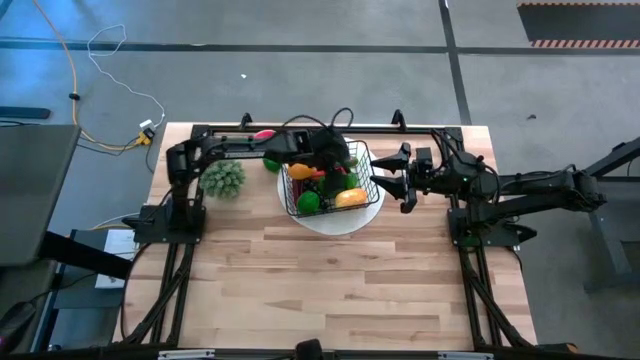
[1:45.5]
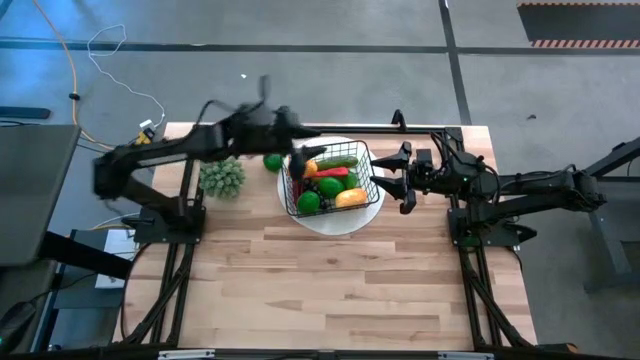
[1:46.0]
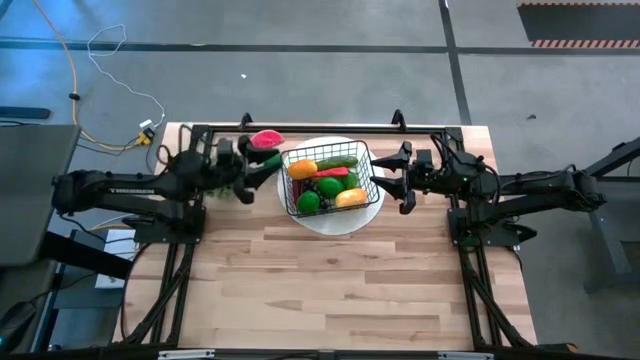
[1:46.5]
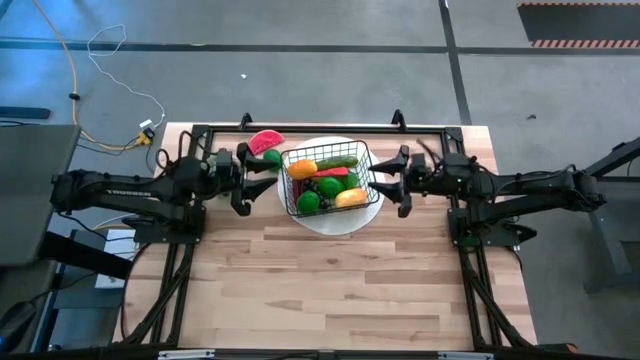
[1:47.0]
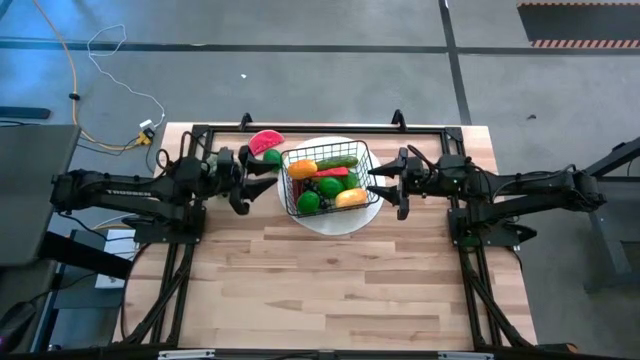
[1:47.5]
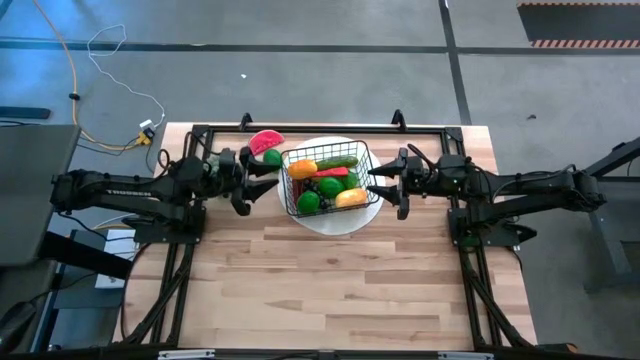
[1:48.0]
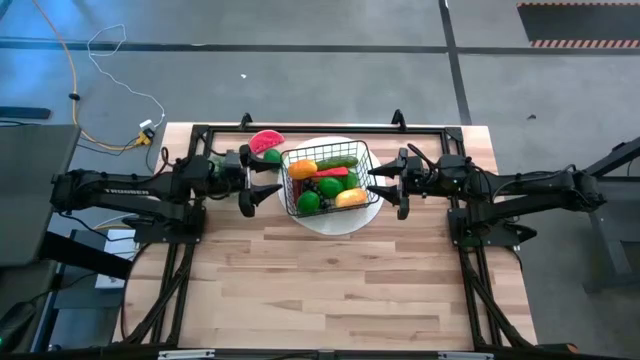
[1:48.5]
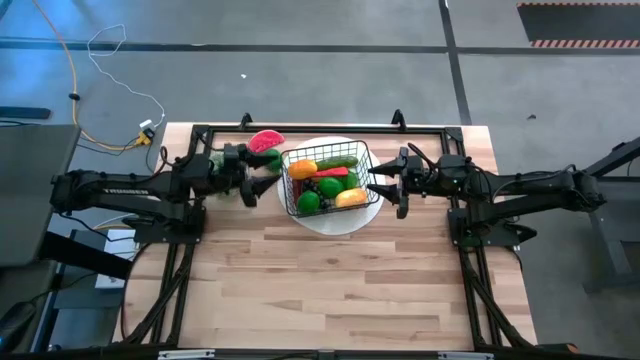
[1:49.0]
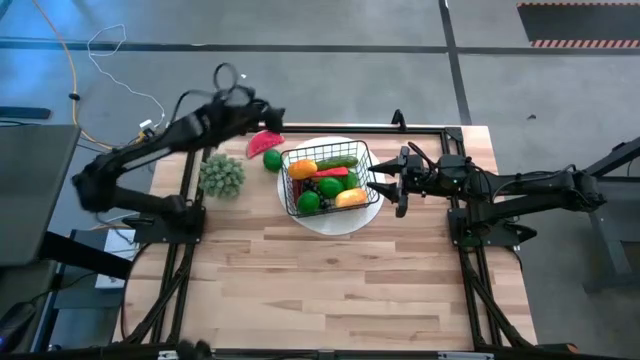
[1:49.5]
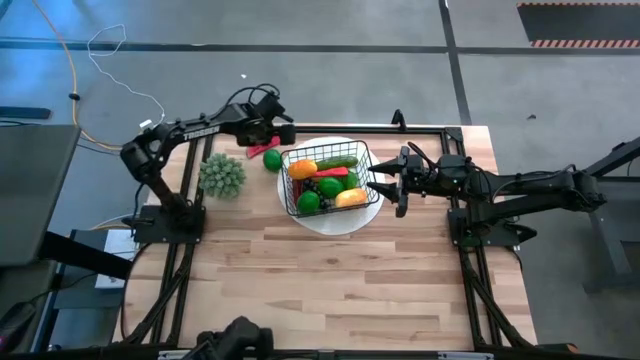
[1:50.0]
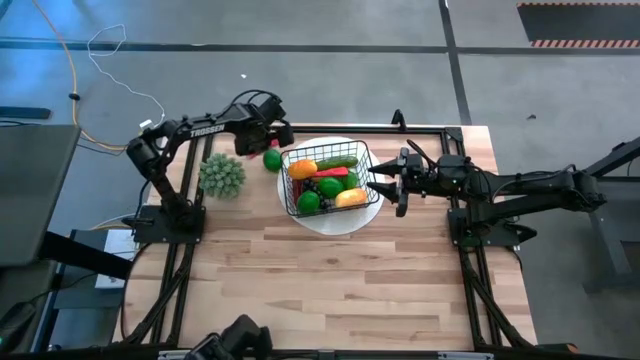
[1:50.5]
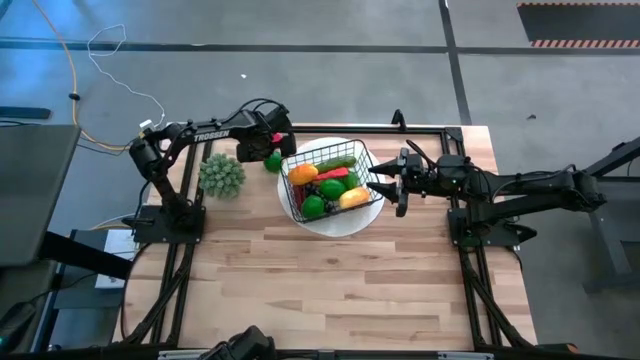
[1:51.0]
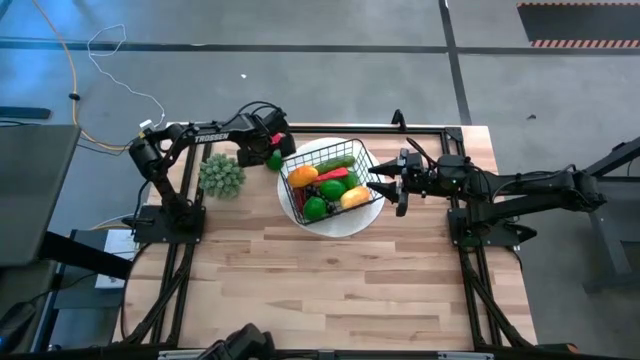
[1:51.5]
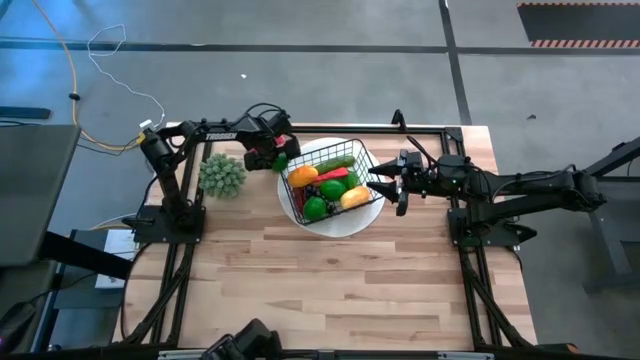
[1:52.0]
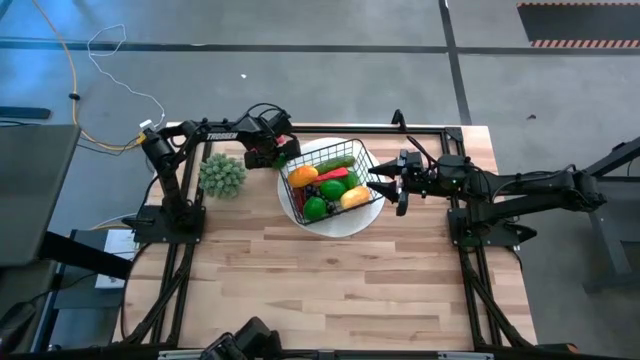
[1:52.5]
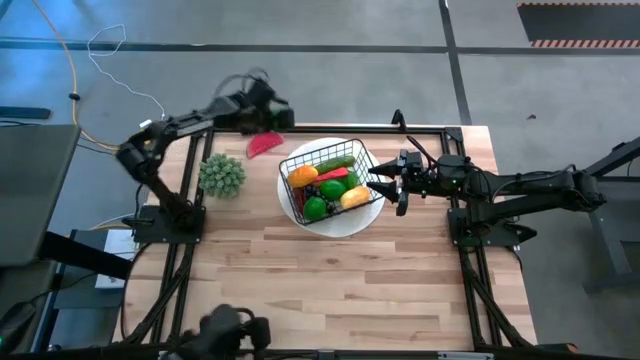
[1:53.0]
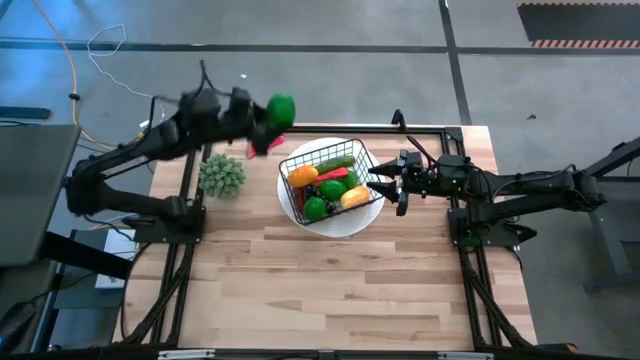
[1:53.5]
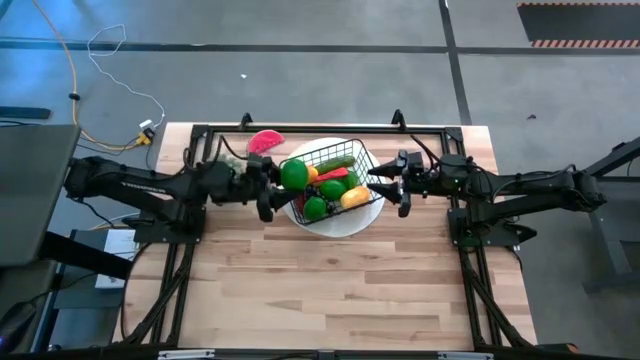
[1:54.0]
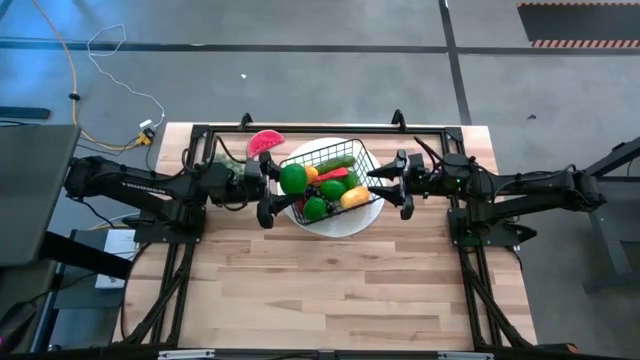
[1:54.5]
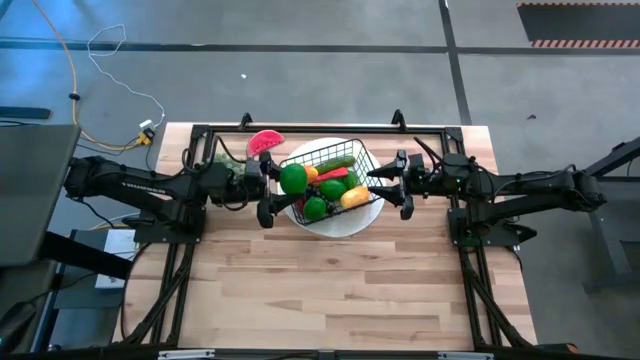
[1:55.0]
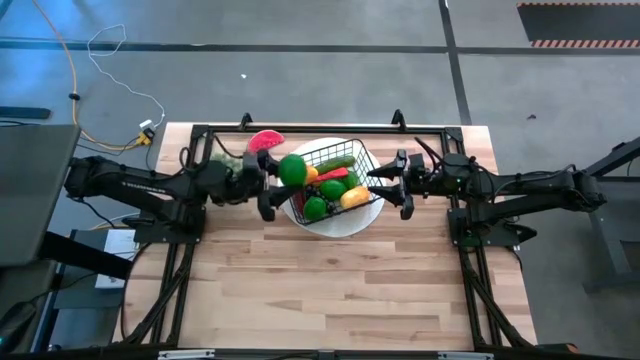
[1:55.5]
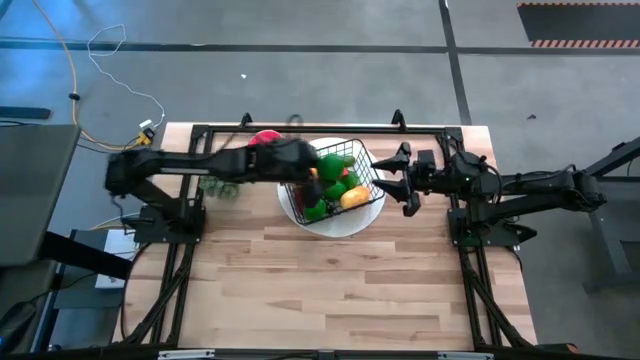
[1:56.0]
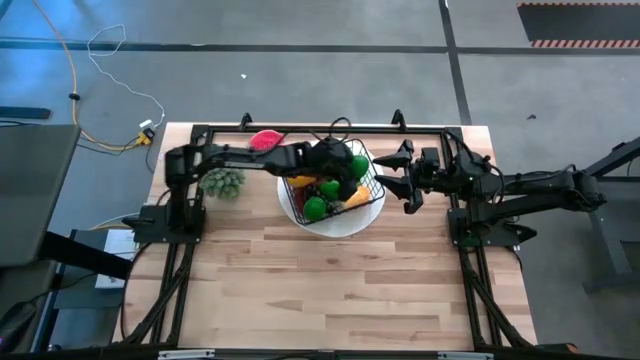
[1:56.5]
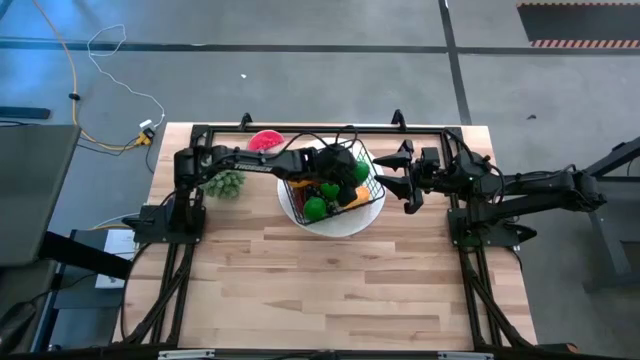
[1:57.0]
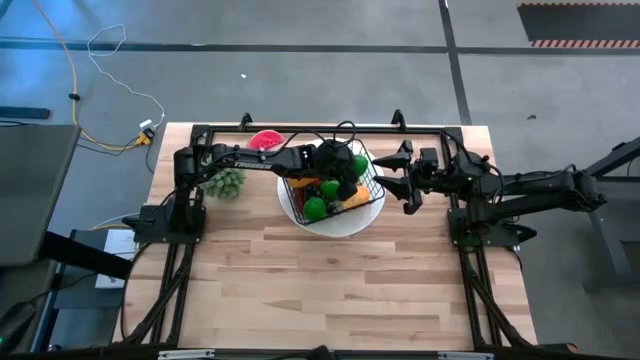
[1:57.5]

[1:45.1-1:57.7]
Task: Build produce basket
Put the green lime into the black wire basket

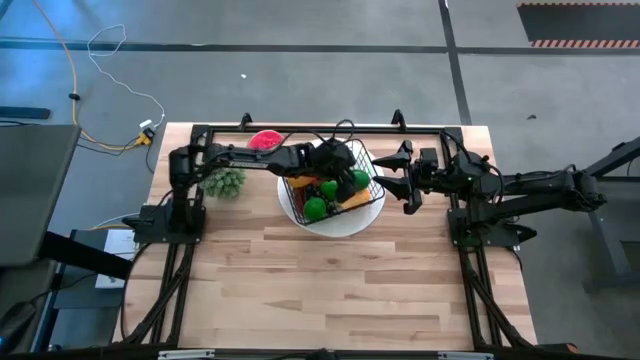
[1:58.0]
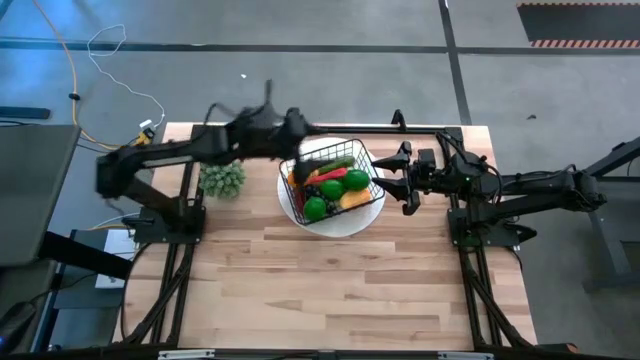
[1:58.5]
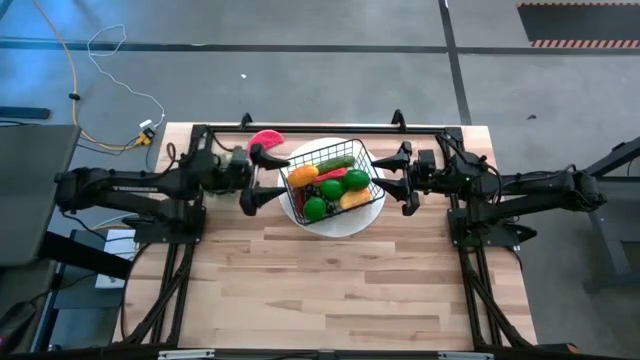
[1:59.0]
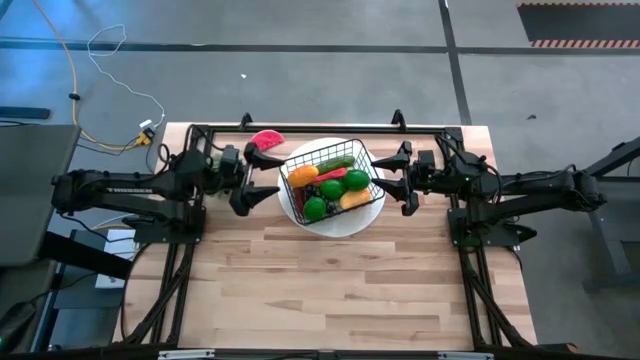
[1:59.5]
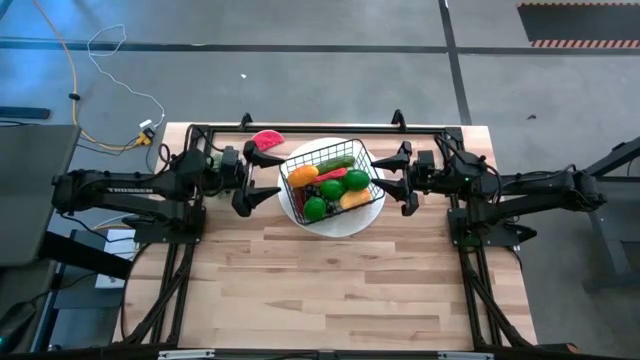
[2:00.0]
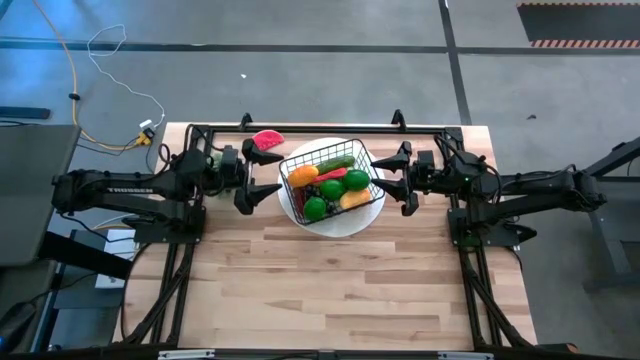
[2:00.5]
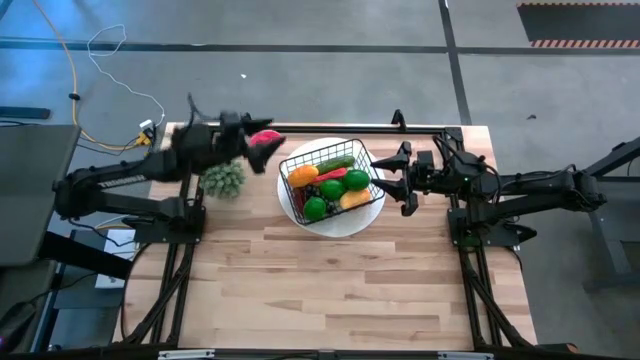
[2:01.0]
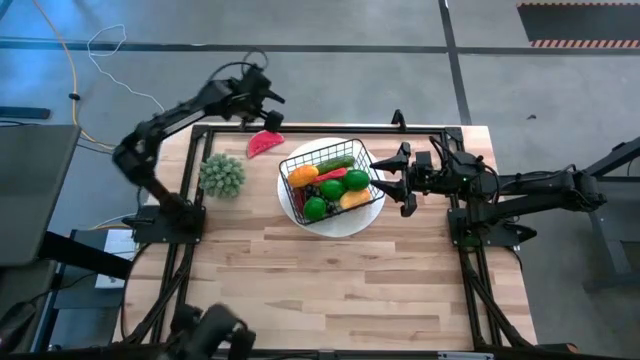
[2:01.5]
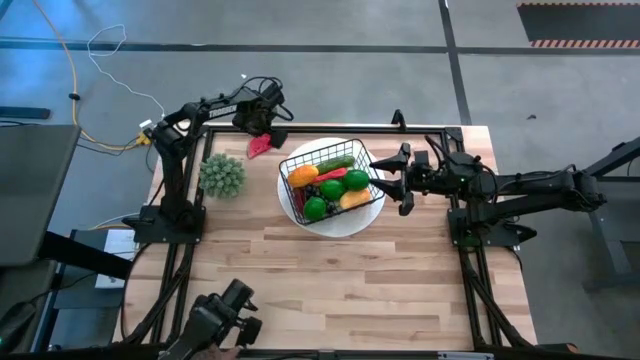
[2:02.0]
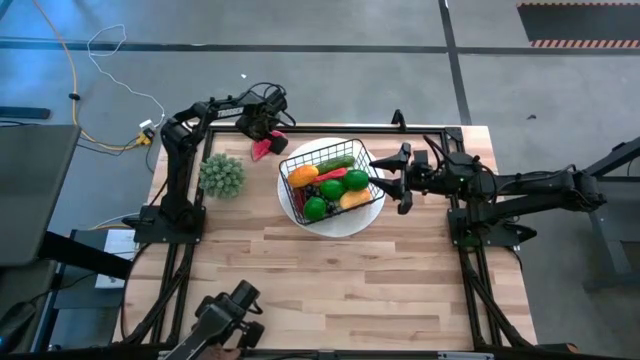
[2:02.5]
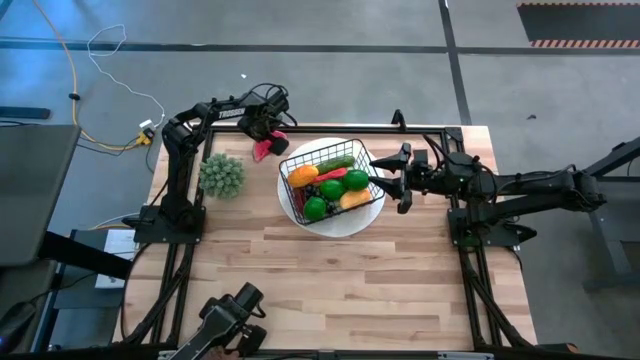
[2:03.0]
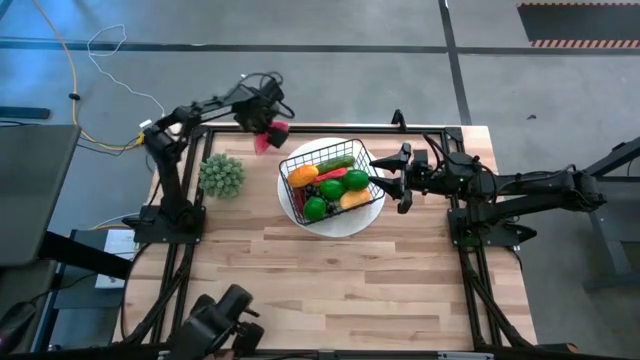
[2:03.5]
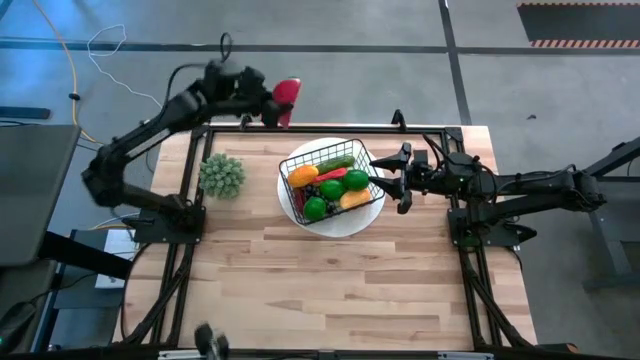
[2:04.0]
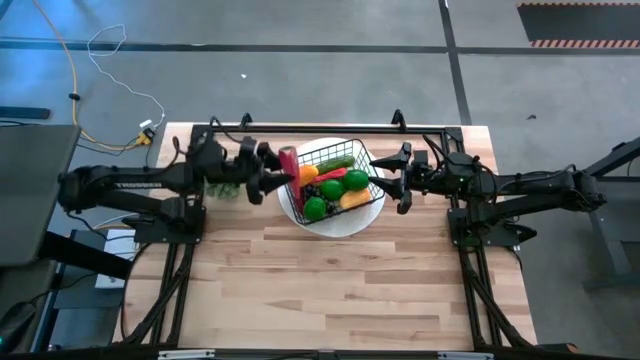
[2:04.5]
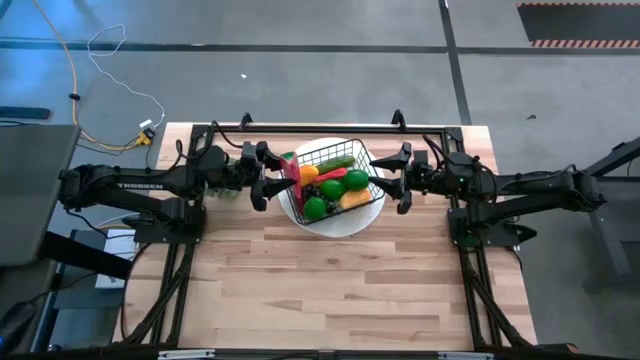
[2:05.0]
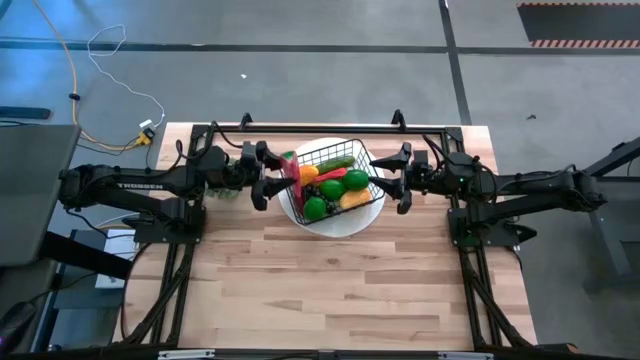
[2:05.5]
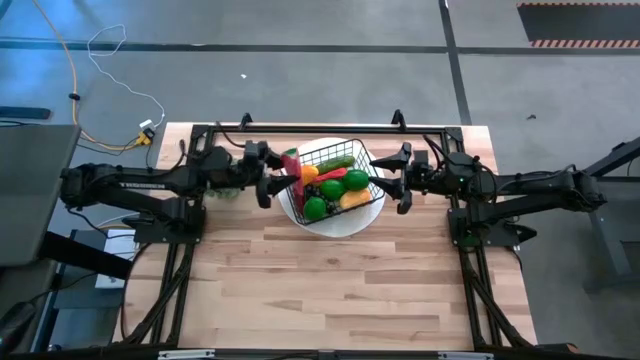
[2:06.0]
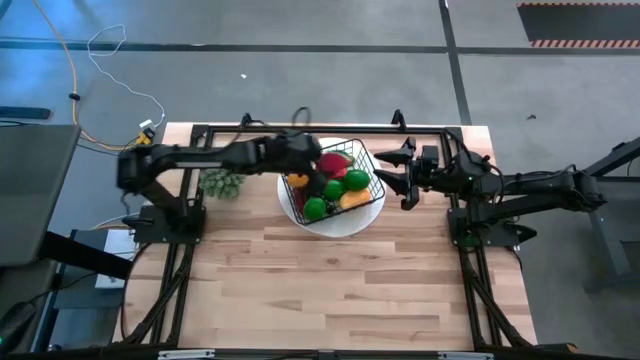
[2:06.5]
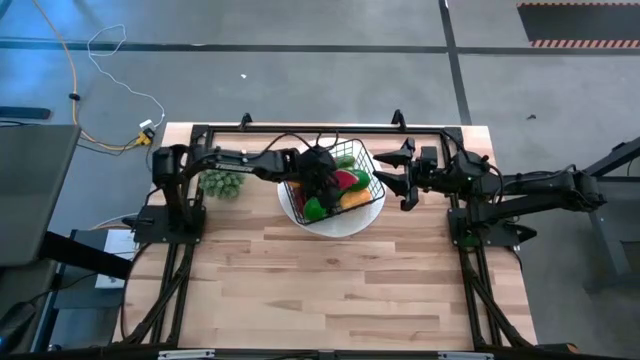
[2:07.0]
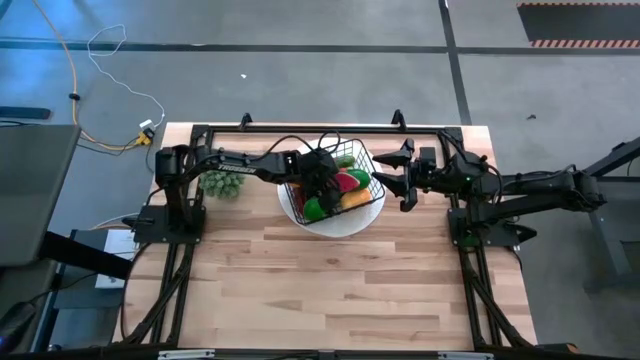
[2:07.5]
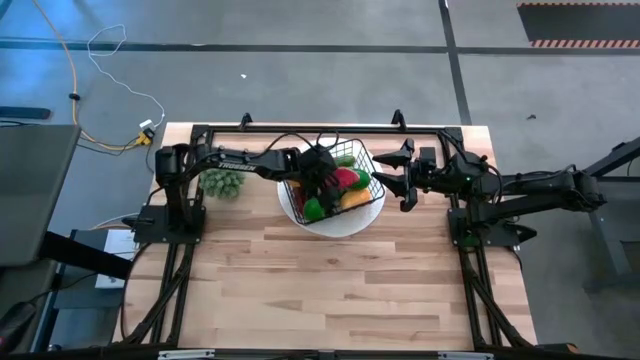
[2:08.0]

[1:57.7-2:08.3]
Put the red watermelon into the black wire basket
